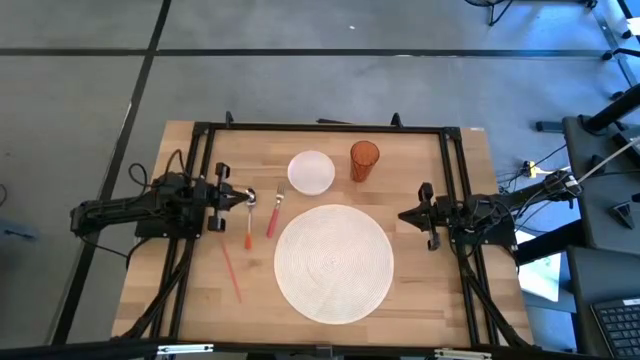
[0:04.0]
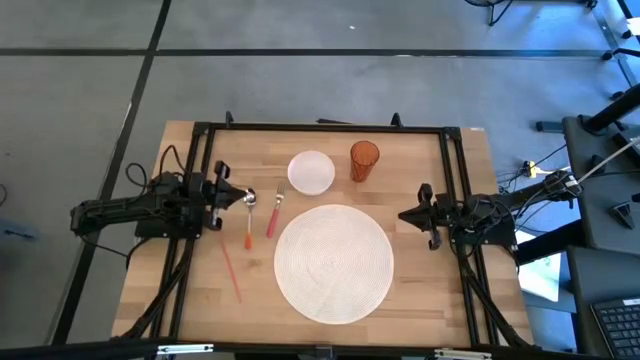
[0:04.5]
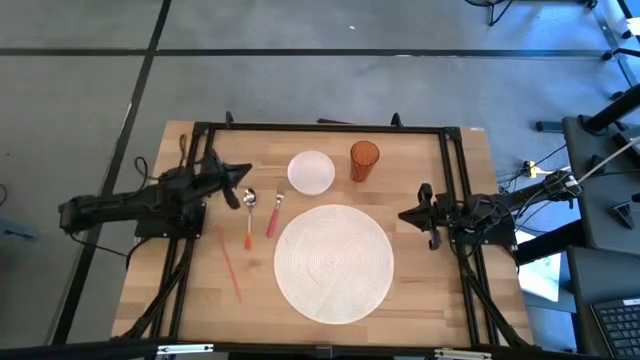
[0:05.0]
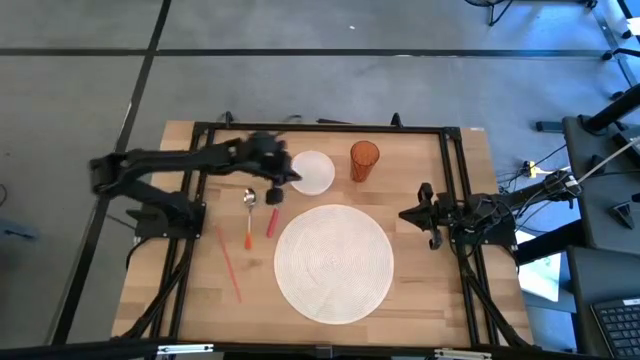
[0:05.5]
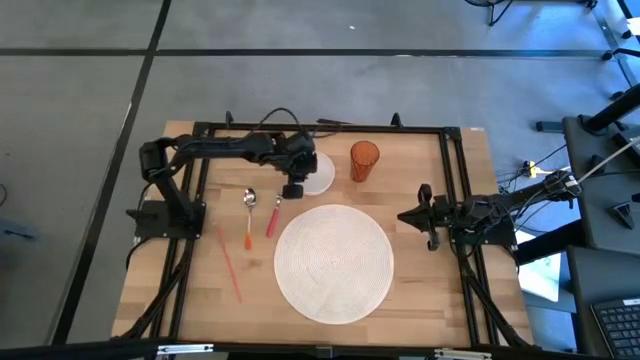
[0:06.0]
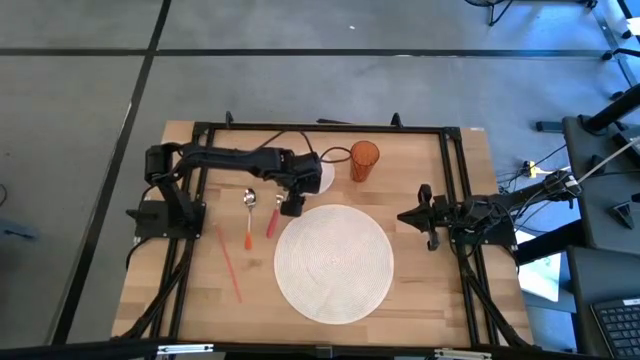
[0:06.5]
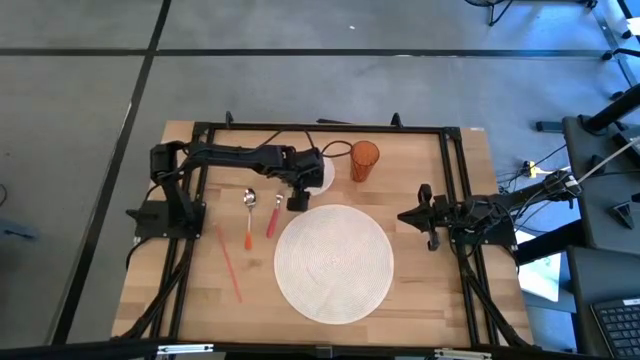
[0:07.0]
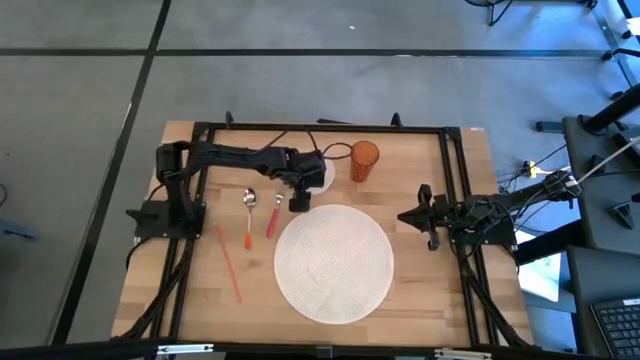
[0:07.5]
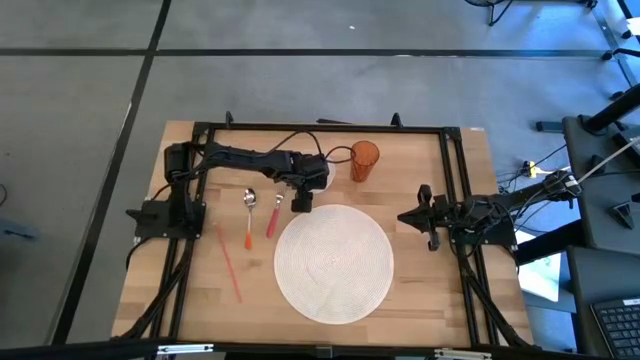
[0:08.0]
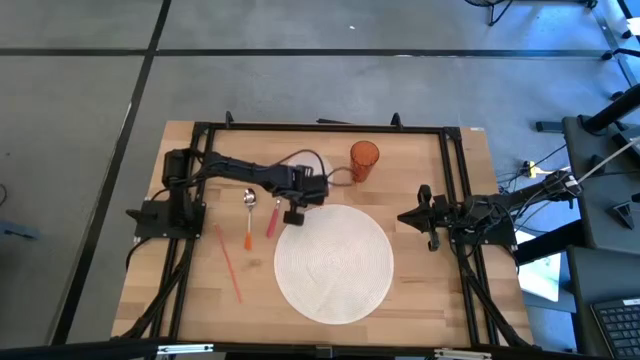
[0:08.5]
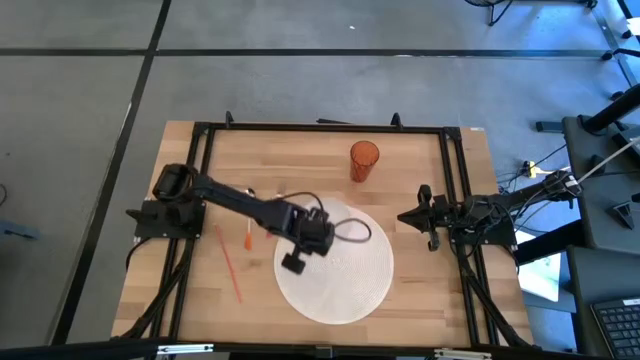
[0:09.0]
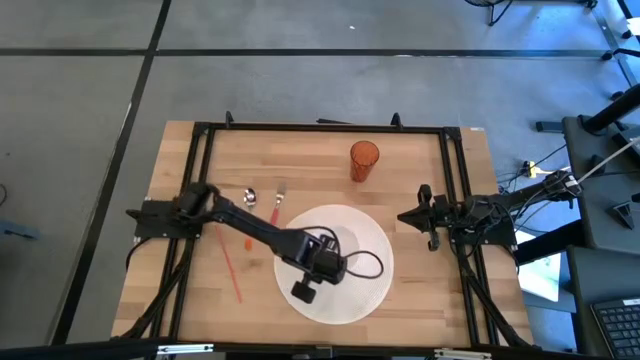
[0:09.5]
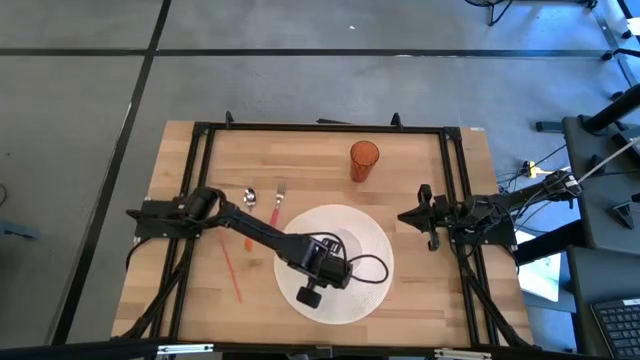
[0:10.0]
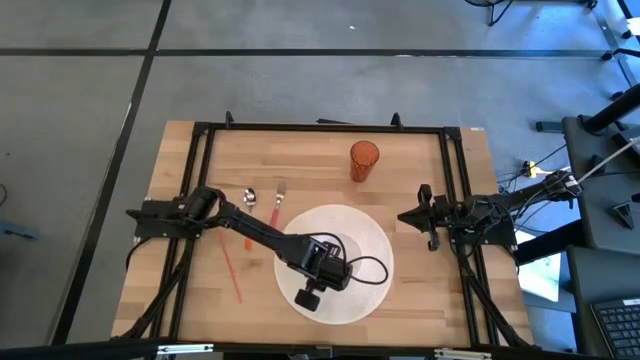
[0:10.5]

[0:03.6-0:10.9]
Task: Pick & Place Utensil
Put the white bowl in the center of the white mat

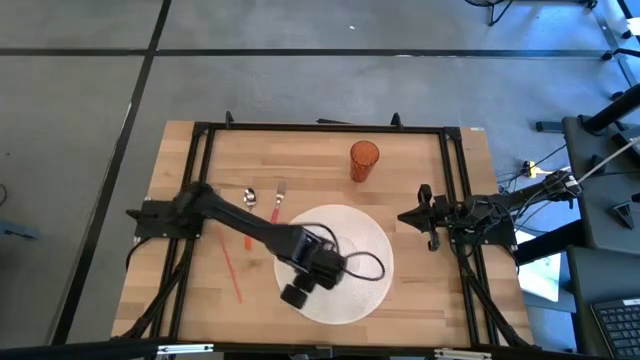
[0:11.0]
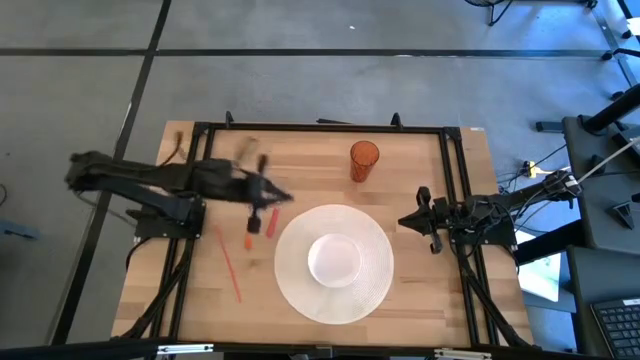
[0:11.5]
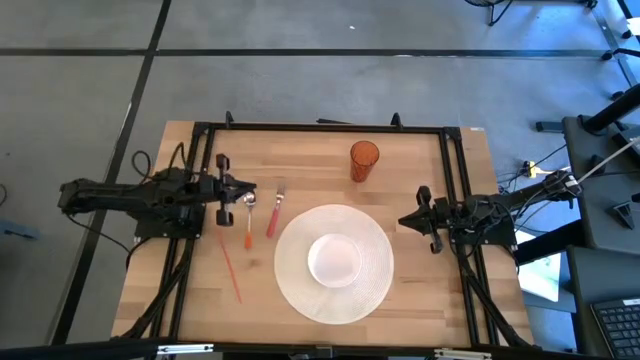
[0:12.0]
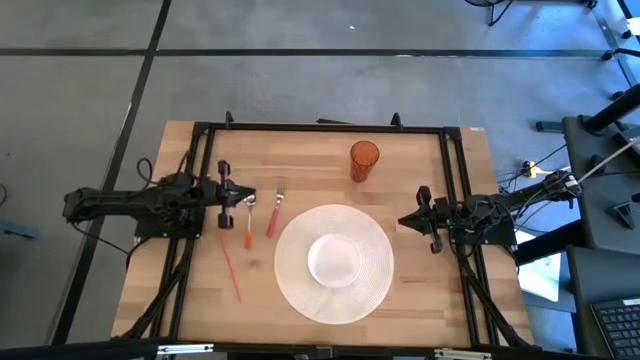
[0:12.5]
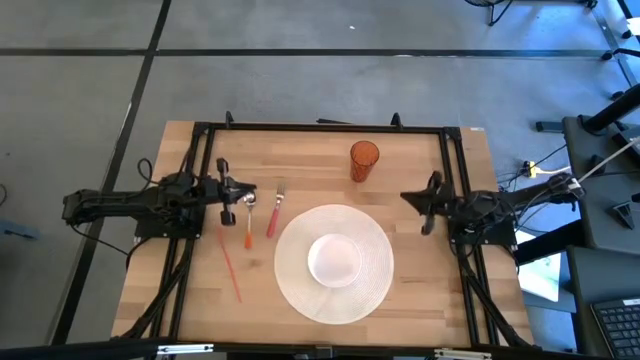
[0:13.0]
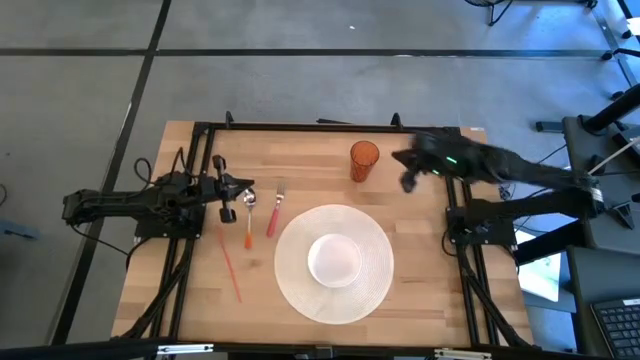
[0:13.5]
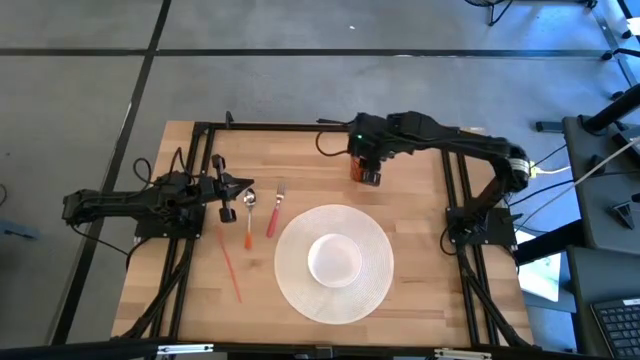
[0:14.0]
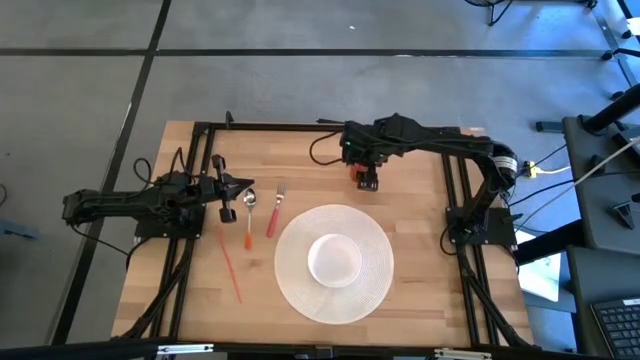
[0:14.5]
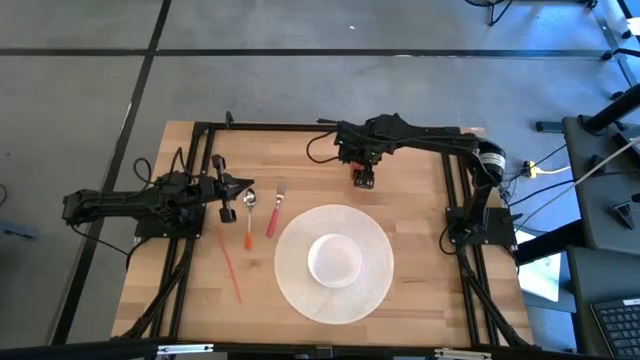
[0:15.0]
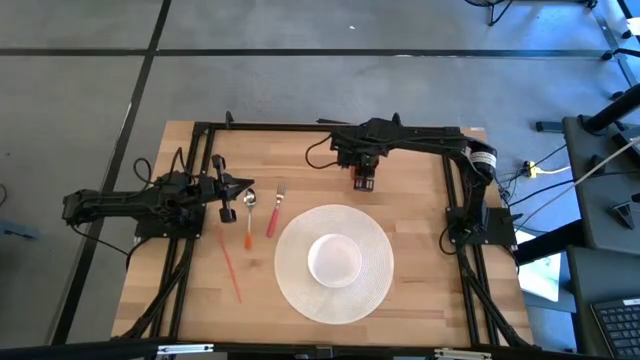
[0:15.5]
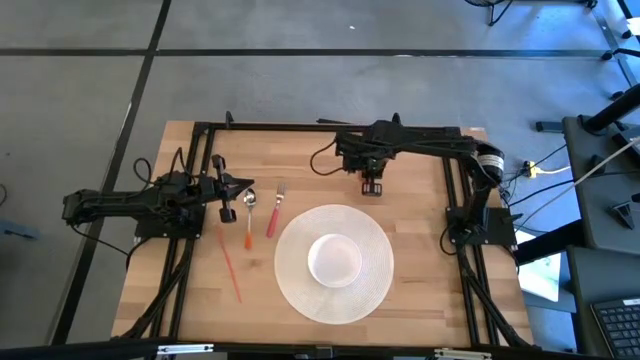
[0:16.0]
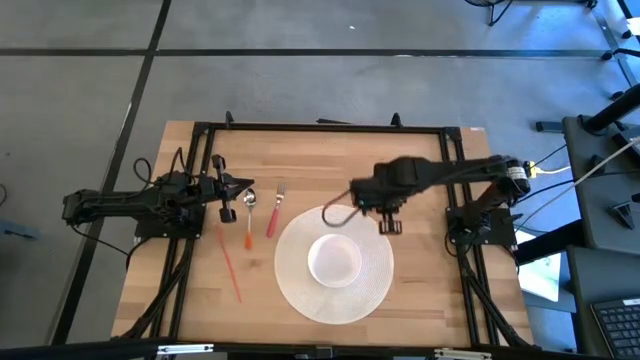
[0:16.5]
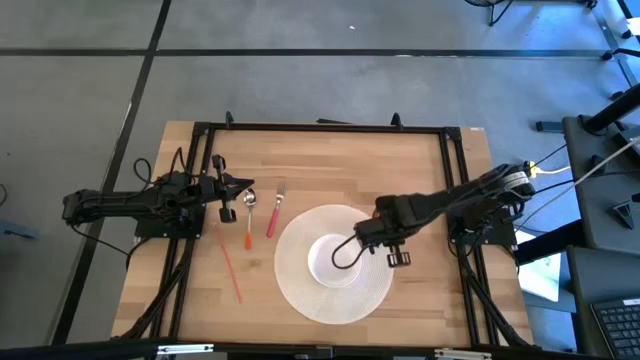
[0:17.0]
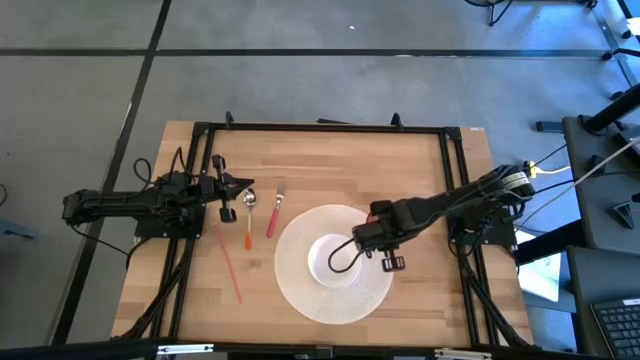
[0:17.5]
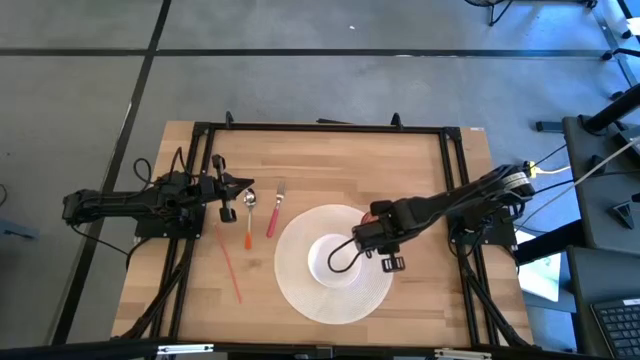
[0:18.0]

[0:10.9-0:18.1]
Put the orange cup on the white mat to the top right of the white bowl

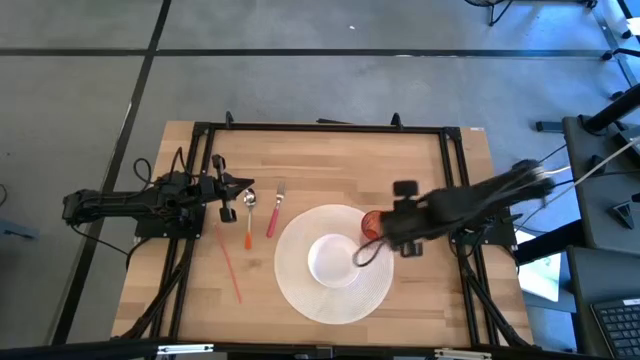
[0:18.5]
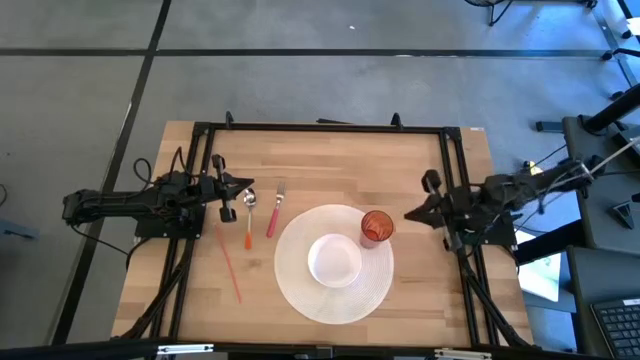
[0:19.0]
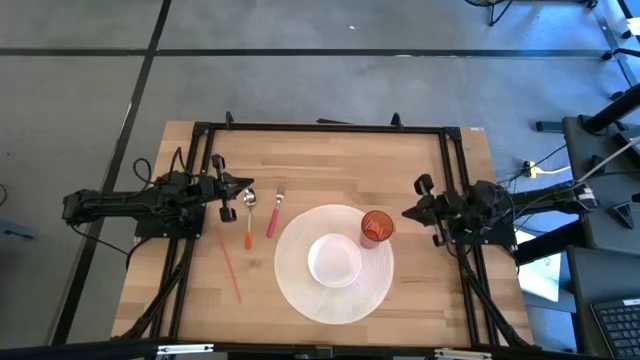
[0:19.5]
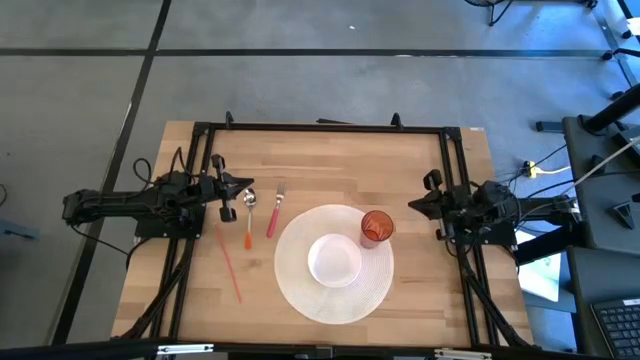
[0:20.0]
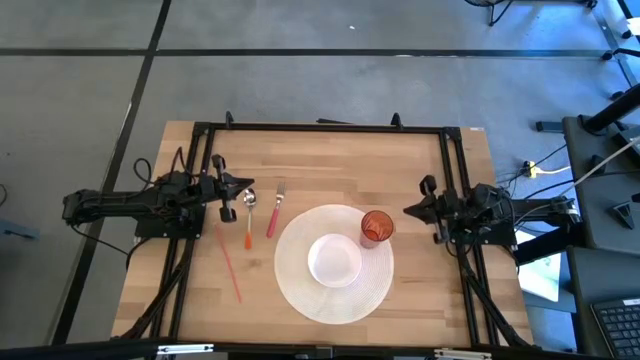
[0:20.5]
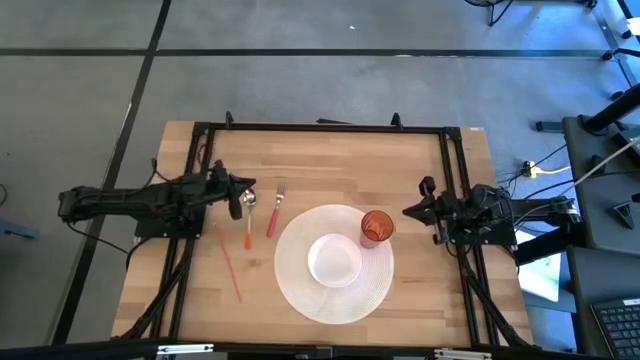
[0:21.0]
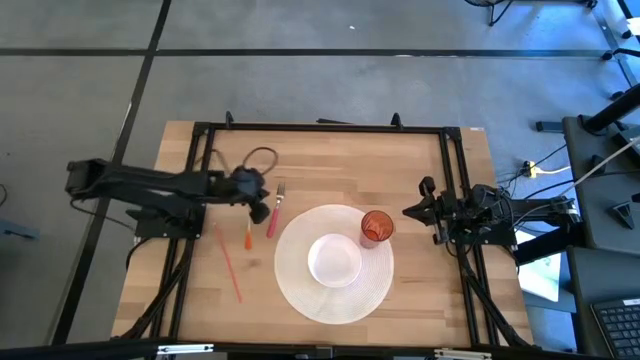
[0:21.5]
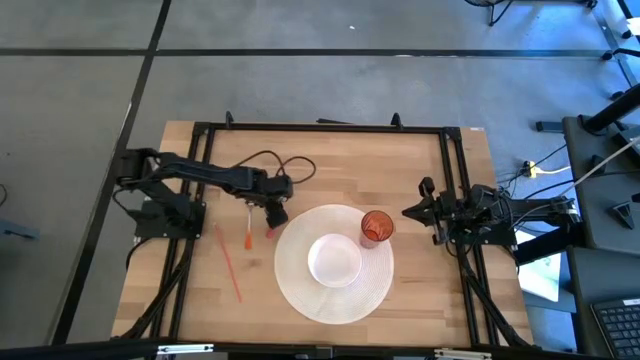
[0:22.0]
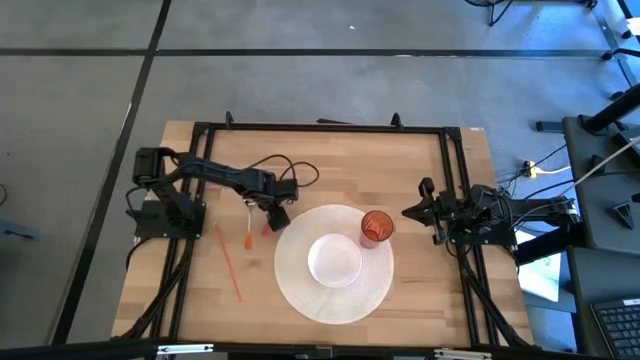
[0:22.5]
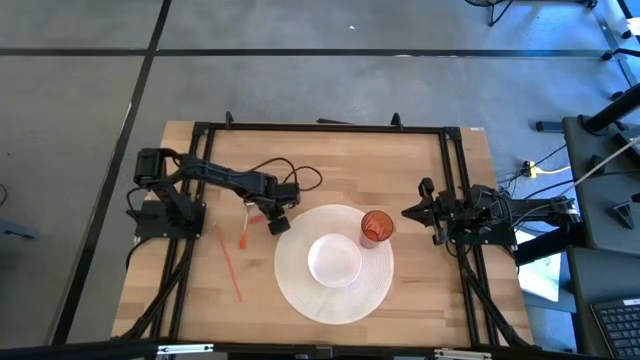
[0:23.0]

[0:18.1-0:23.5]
Put the pink fork into the white bowl

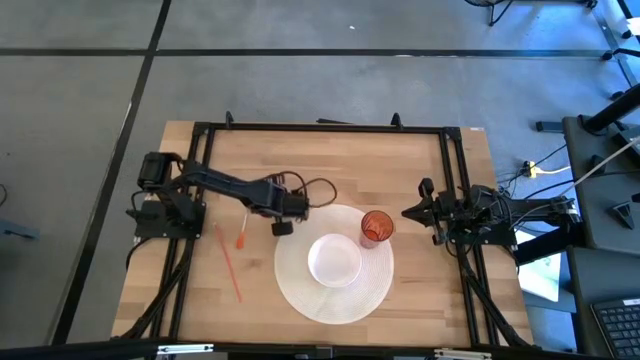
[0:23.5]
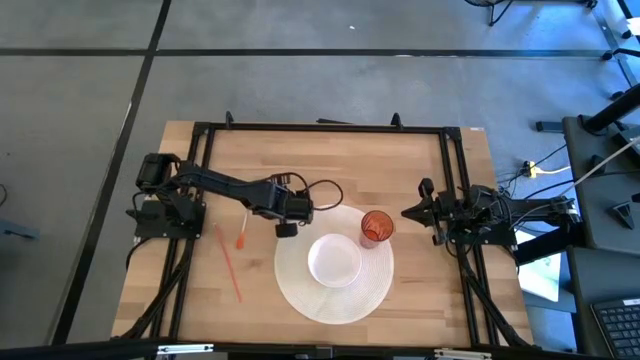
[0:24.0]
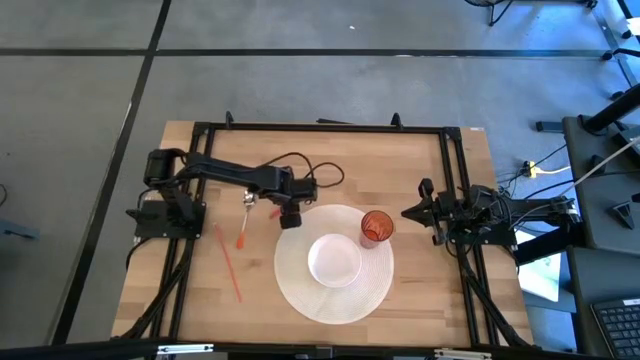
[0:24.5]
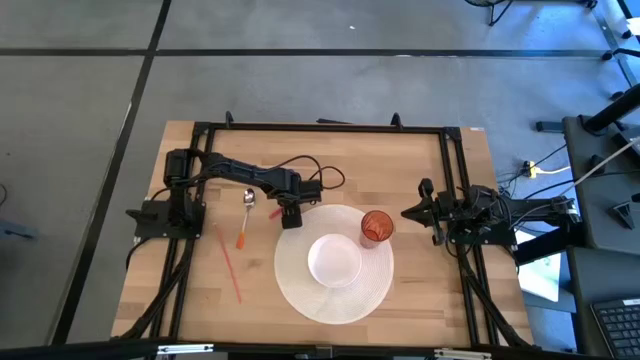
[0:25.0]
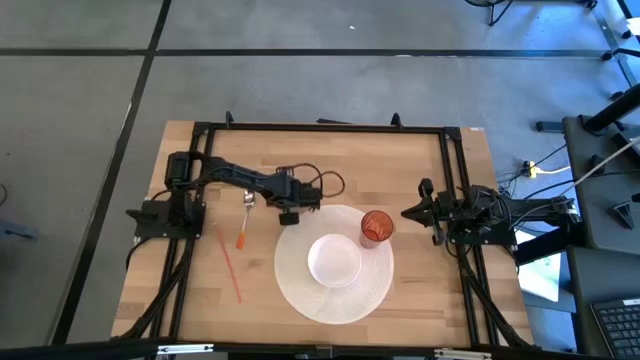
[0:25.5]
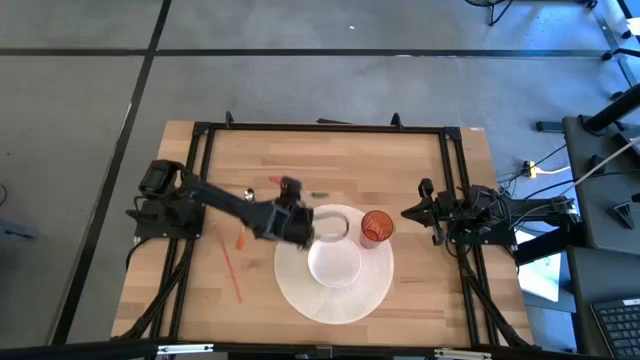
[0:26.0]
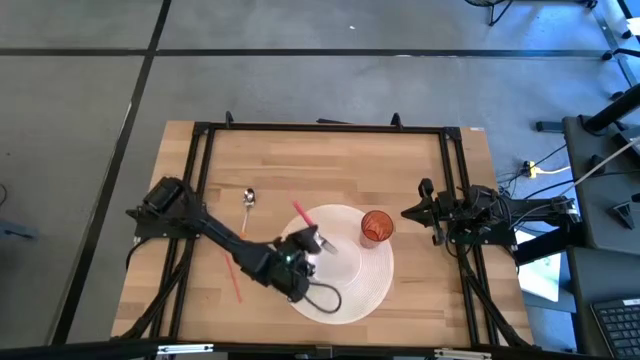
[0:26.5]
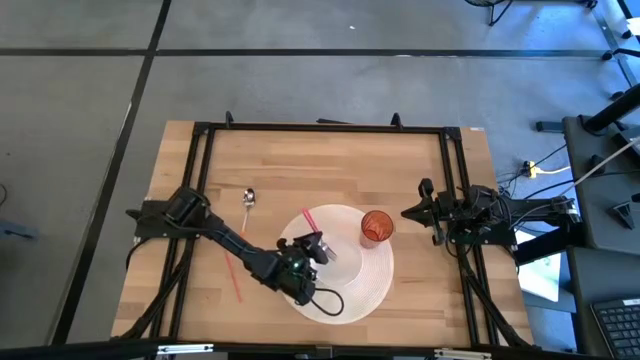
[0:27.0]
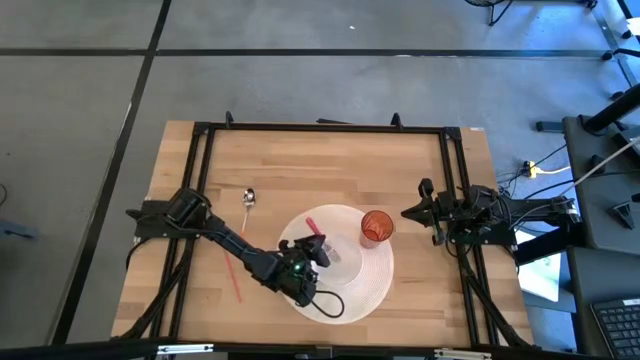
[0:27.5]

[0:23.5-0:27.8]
Put the pink fork into the white bowl
